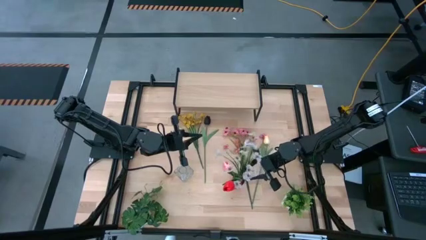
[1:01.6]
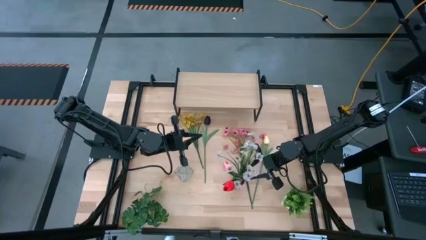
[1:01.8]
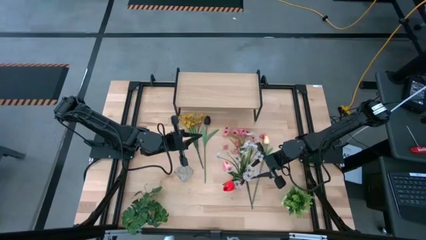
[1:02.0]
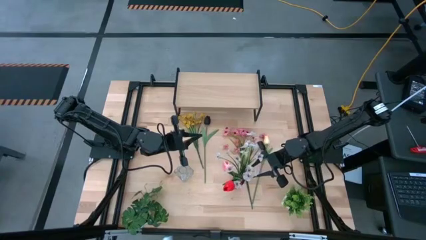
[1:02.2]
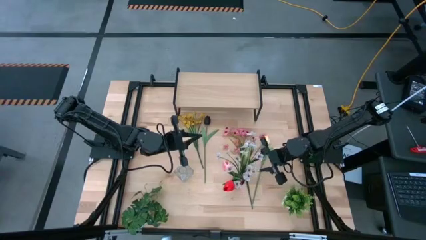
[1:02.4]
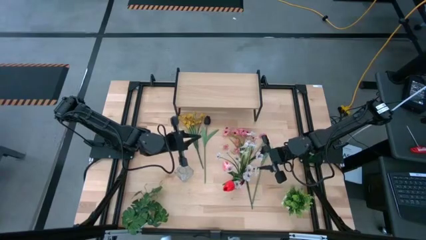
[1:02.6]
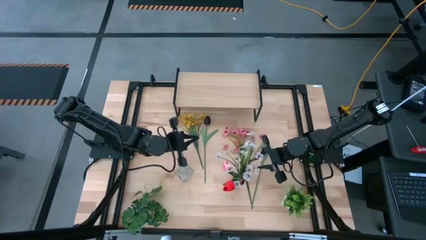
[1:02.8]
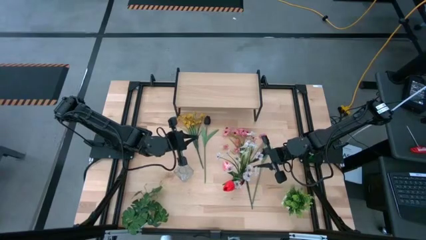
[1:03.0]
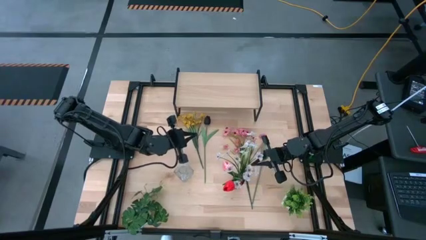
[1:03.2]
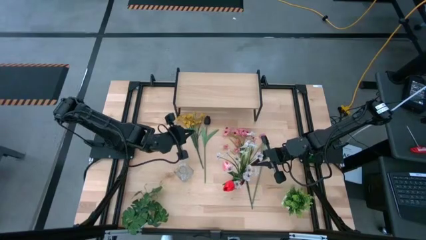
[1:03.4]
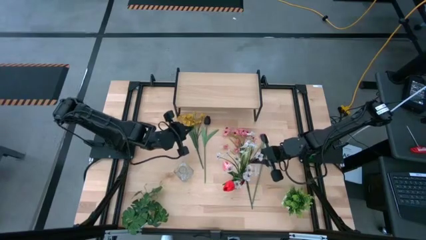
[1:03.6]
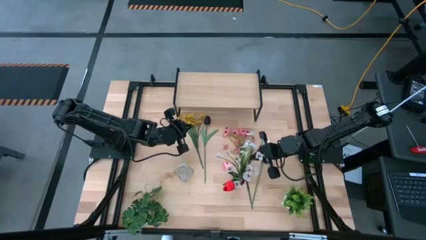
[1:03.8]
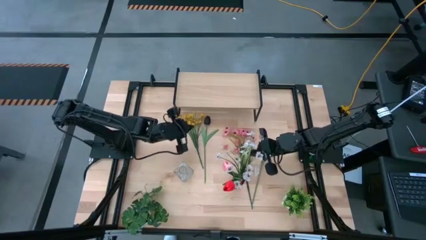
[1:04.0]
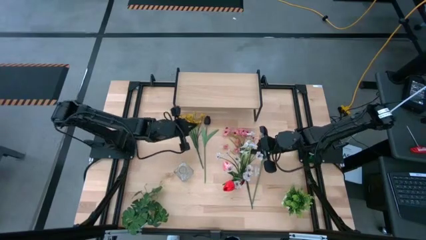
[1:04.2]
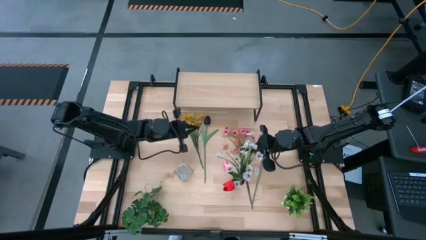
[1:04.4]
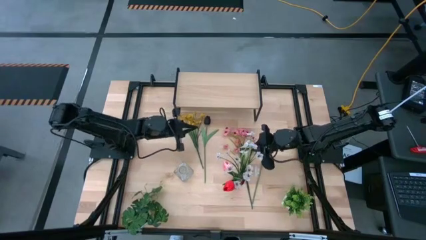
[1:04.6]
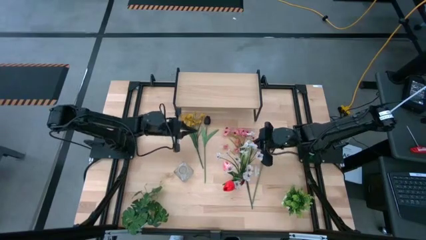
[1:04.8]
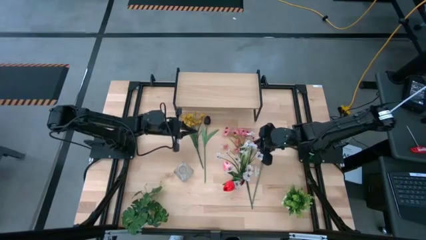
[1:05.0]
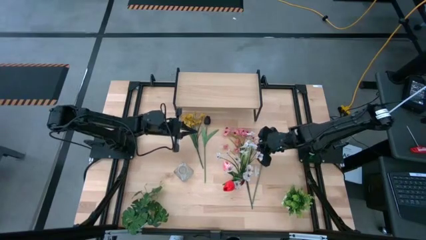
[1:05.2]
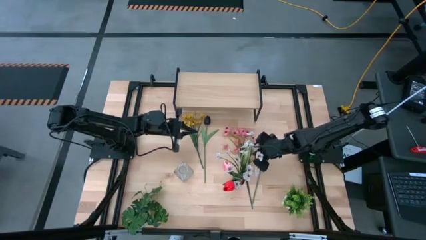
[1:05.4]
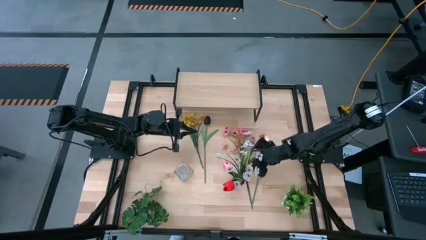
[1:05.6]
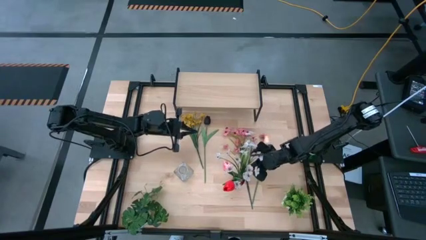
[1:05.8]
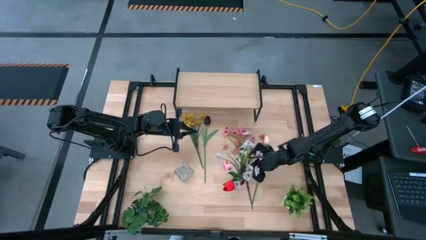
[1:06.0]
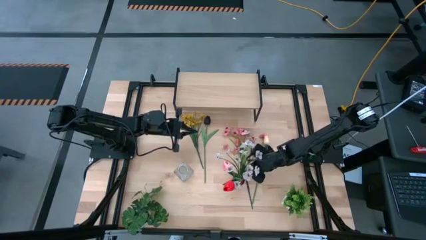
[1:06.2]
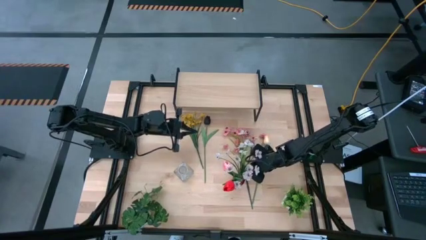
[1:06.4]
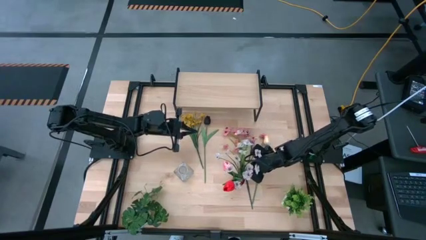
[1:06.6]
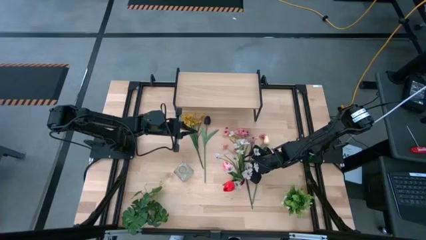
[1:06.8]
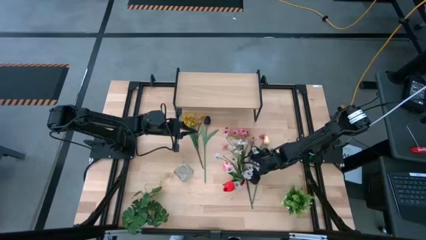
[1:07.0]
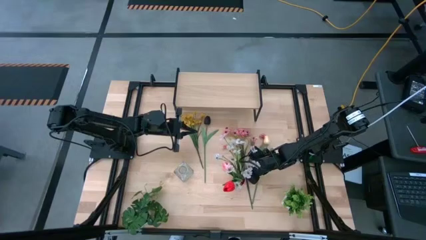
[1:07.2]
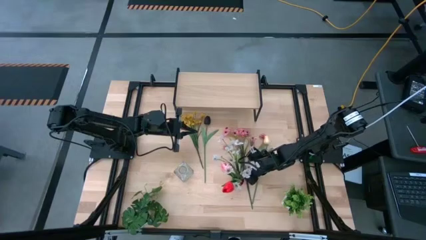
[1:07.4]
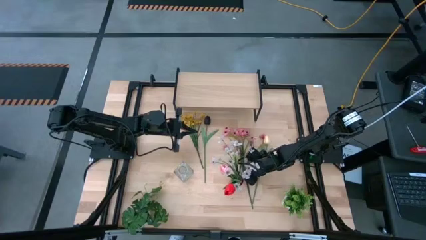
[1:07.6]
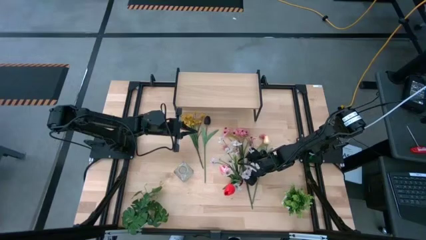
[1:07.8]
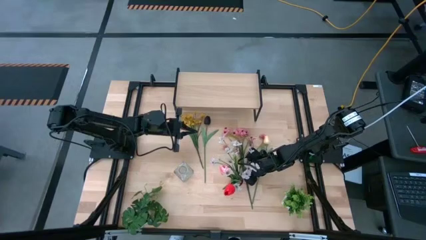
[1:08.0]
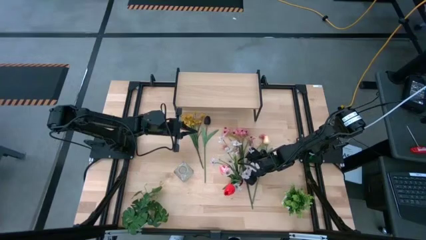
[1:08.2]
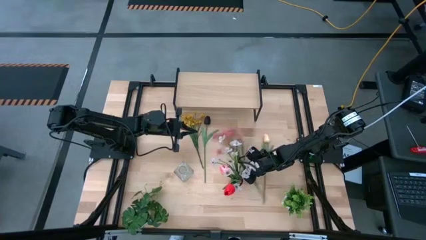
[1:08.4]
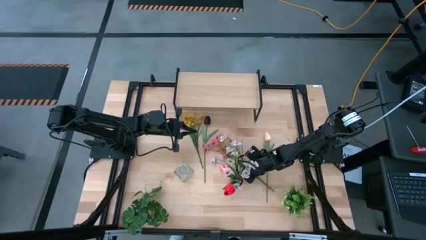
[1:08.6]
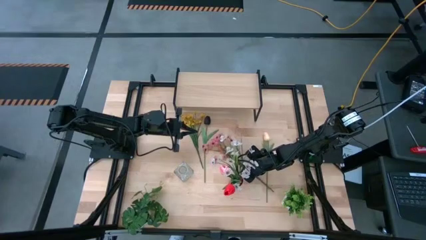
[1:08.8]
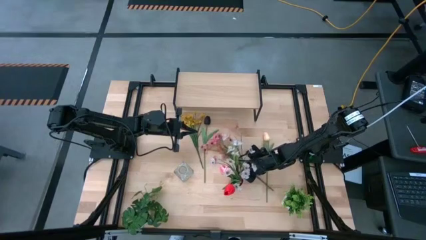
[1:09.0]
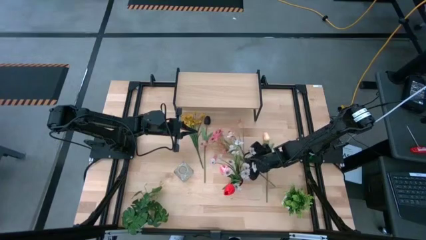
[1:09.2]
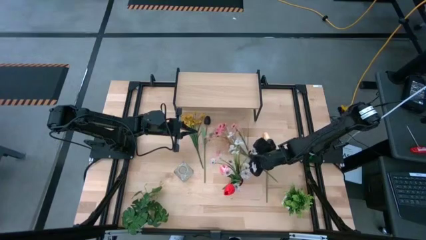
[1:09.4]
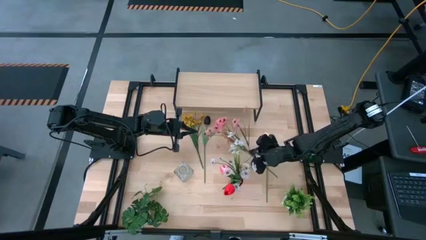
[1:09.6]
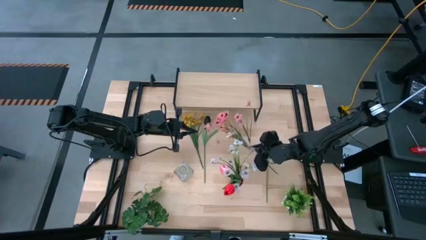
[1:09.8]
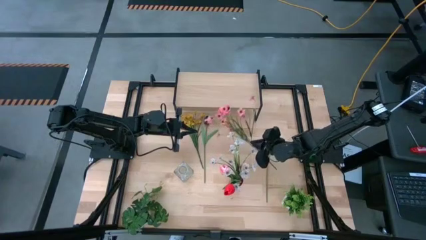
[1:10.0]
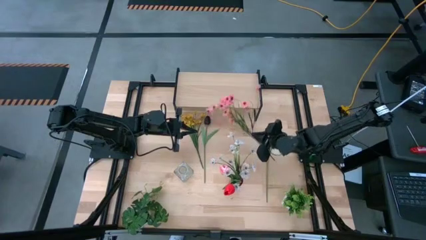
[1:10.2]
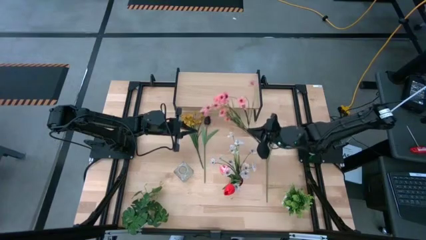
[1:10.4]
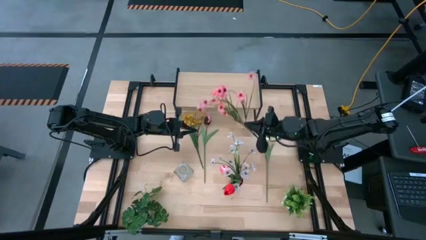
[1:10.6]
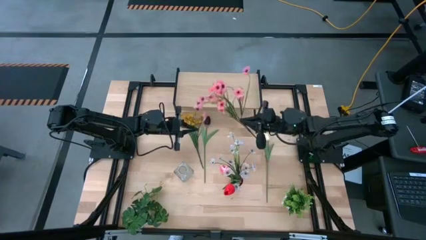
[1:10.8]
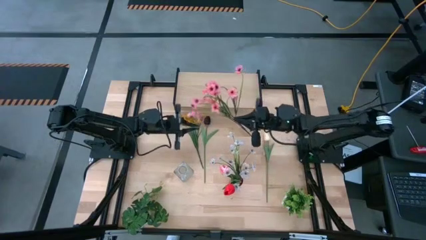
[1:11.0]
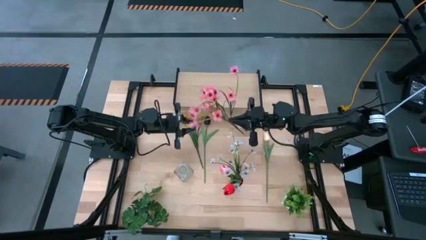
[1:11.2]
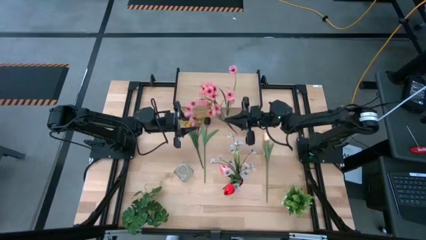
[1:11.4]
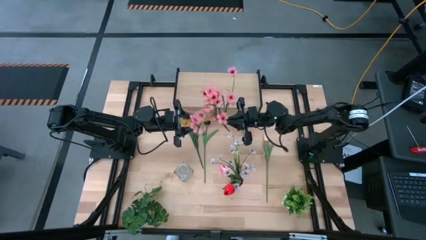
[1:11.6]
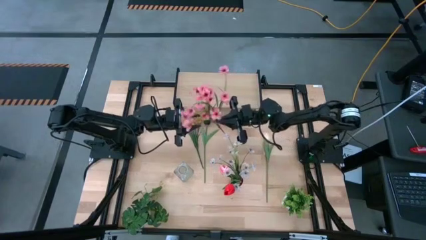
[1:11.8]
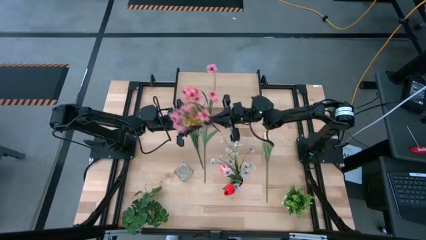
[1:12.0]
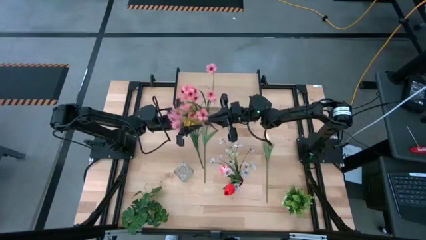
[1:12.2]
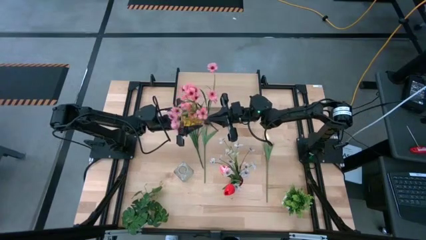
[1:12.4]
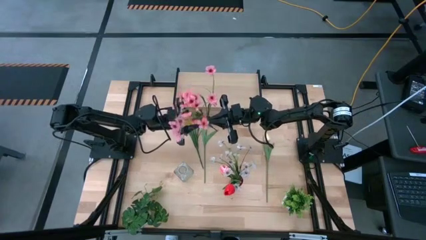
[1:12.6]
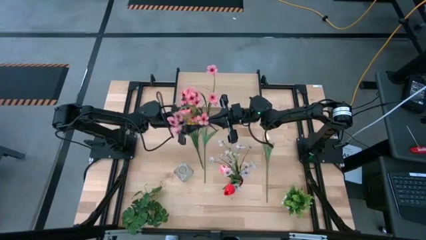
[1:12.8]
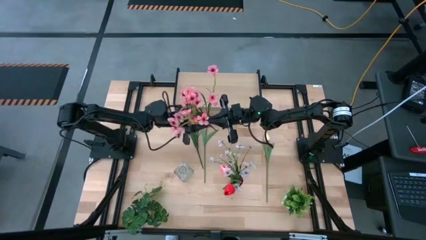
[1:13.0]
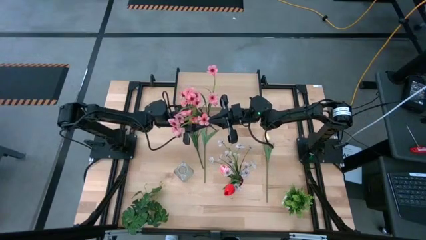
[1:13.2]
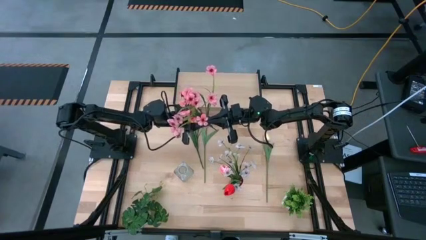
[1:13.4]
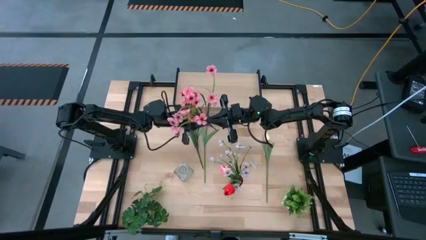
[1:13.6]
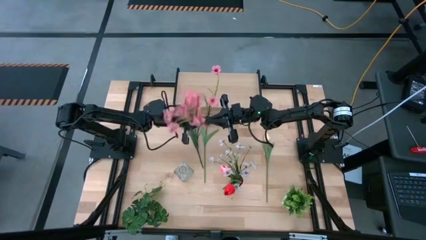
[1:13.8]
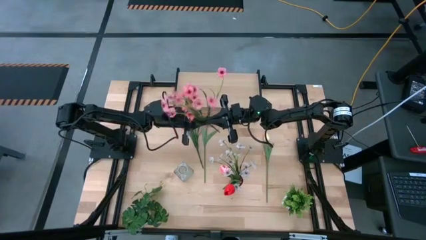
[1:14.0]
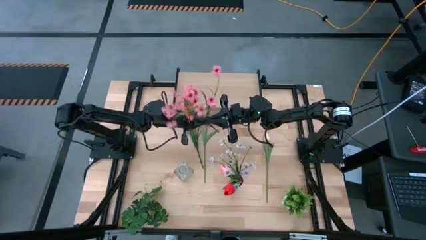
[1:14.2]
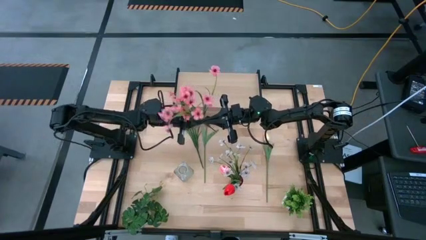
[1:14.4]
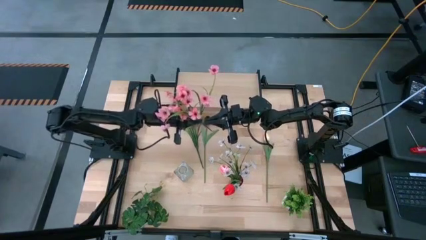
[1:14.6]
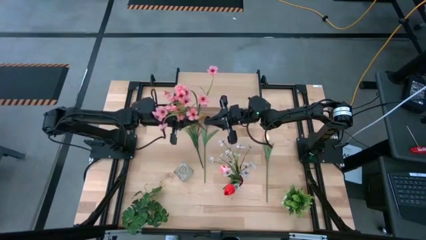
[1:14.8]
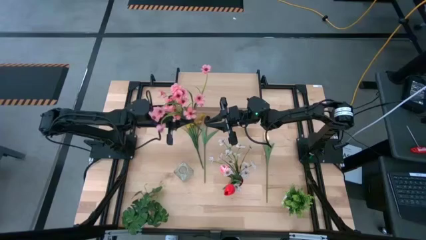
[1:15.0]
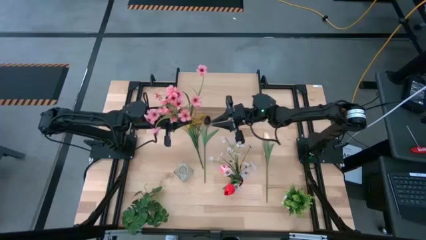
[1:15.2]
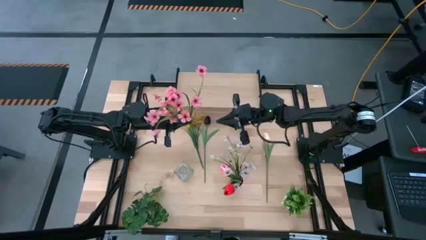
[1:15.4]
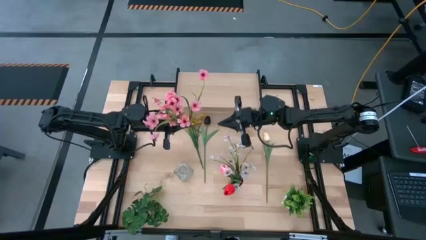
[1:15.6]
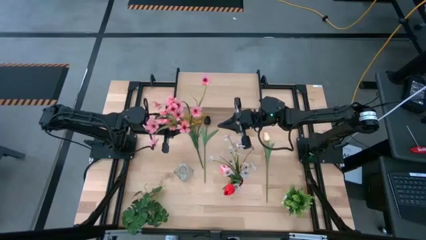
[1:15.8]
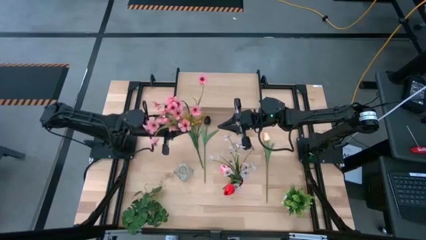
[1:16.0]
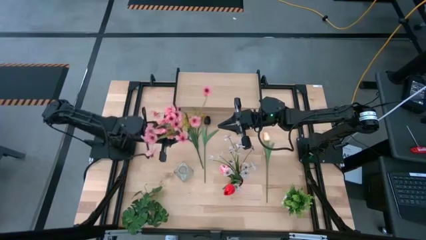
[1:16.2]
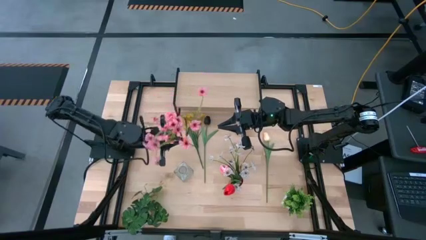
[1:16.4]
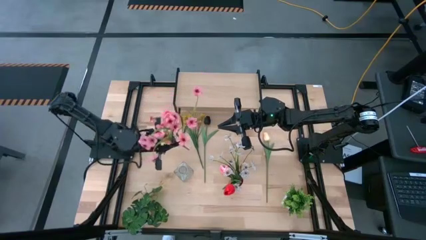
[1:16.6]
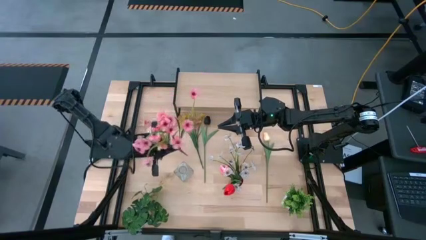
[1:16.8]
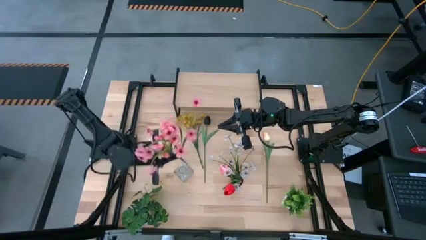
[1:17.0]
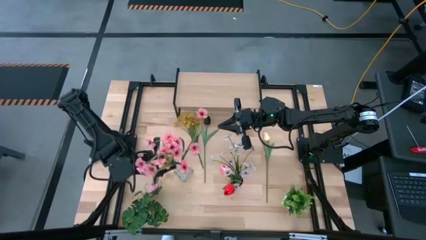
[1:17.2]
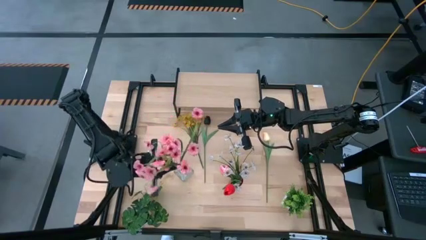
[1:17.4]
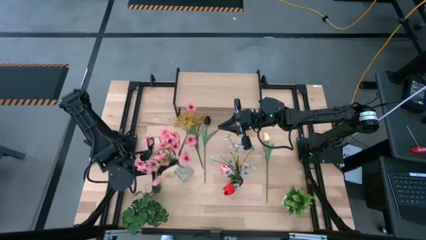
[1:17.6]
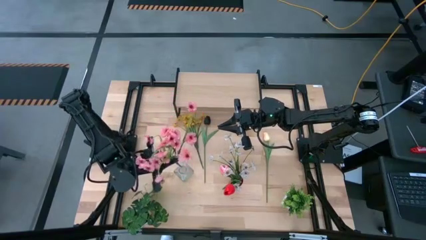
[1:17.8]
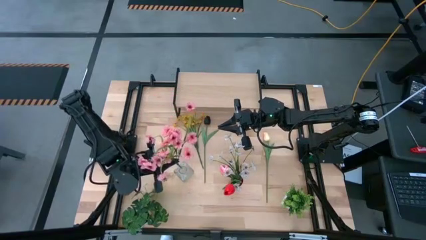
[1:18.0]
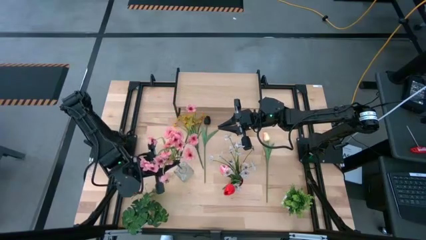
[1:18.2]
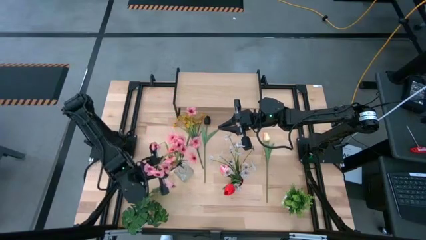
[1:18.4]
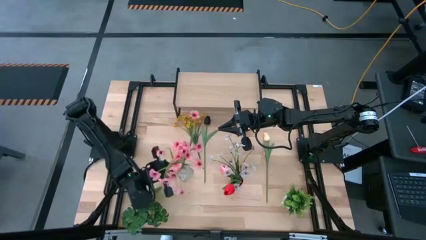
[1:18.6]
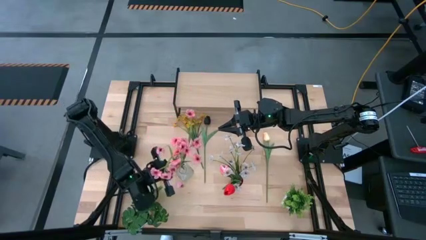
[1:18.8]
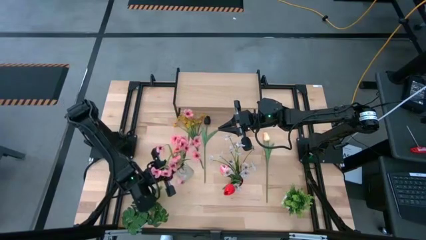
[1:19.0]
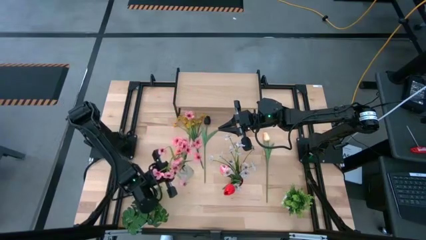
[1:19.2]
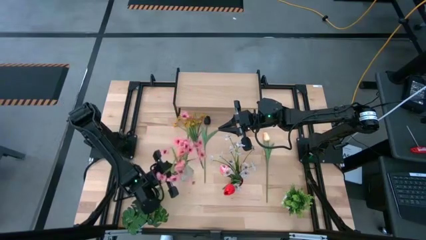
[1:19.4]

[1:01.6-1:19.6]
Task: Pick and place flowers into a vace then onto a shelf
Put the pink flowers into the transparent vase
